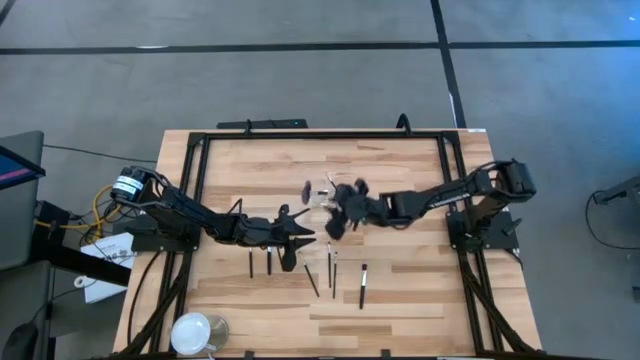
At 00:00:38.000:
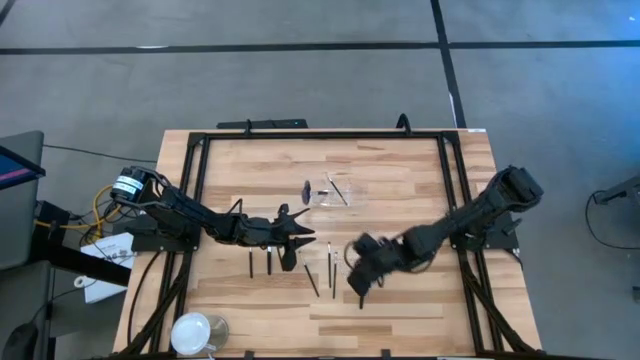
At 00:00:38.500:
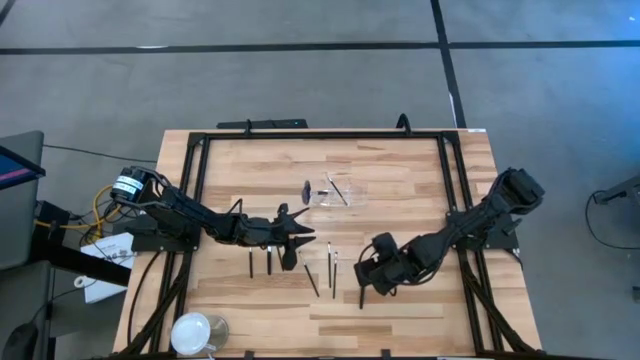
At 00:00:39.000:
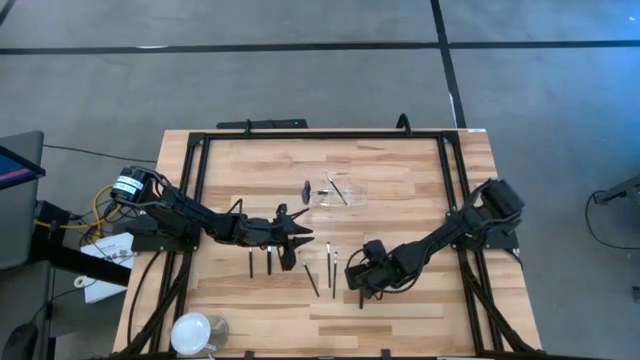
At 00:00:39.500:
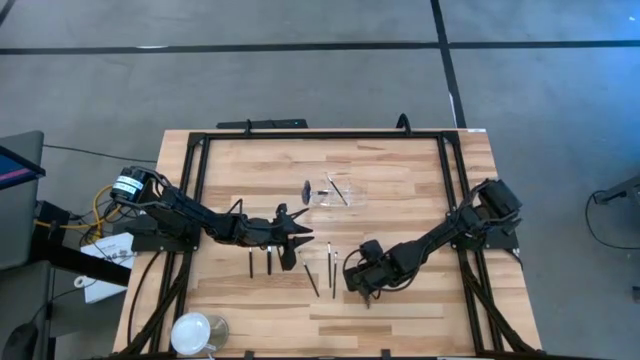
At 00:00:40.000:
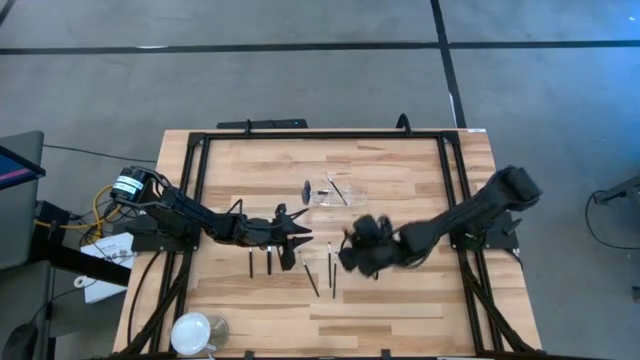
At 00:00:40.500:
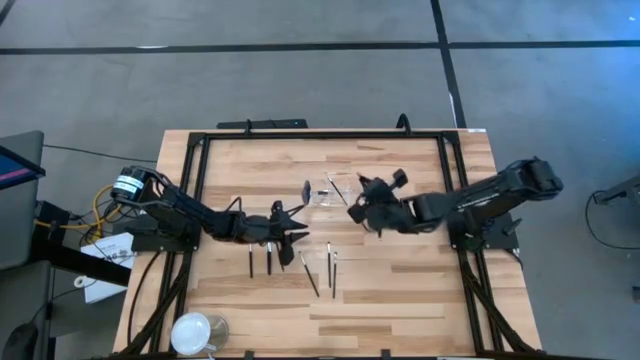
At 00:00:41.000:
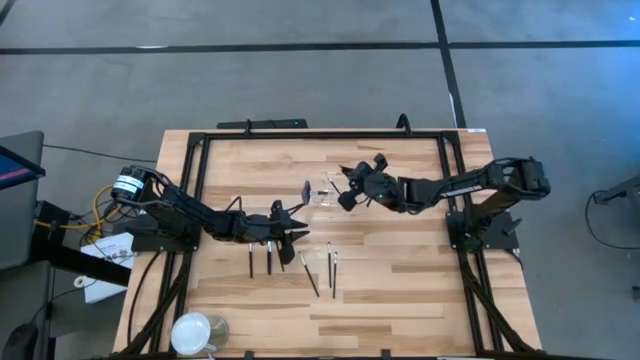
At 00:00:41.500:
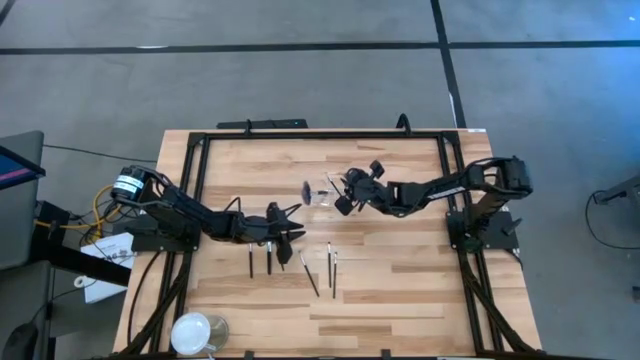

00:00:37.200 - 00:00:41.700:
Task: Put items in baskets/containers
Put the foundation brush into the right section of the transparent organizer

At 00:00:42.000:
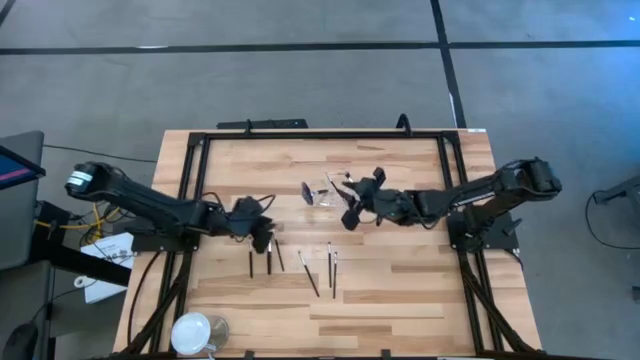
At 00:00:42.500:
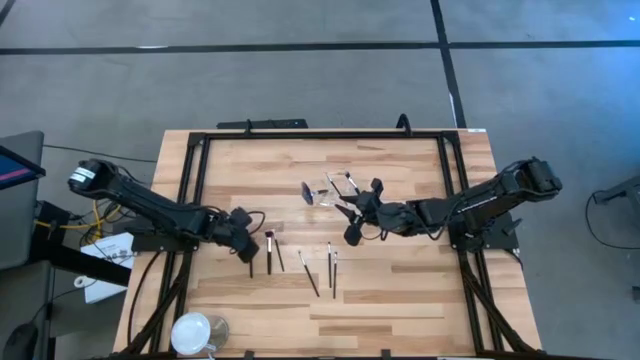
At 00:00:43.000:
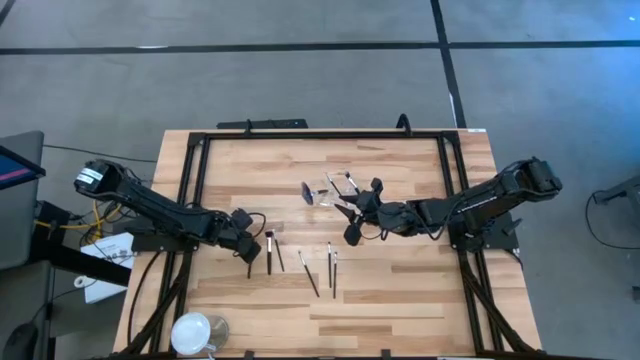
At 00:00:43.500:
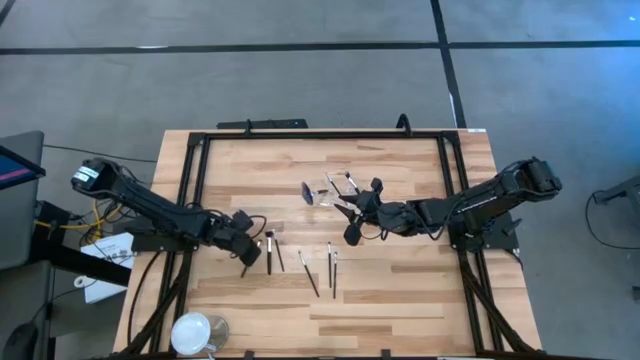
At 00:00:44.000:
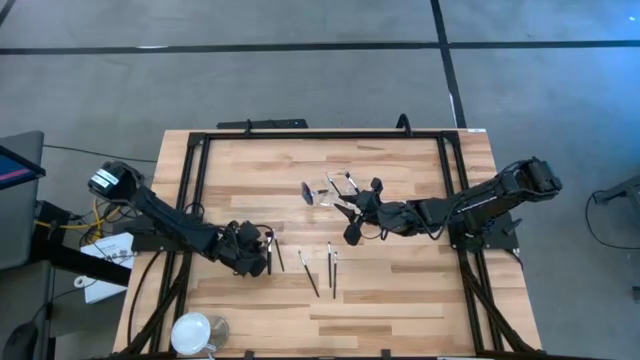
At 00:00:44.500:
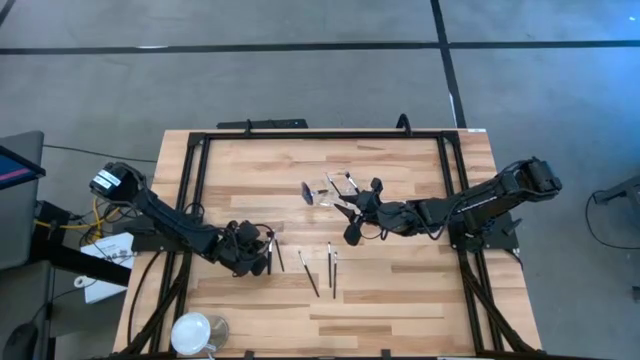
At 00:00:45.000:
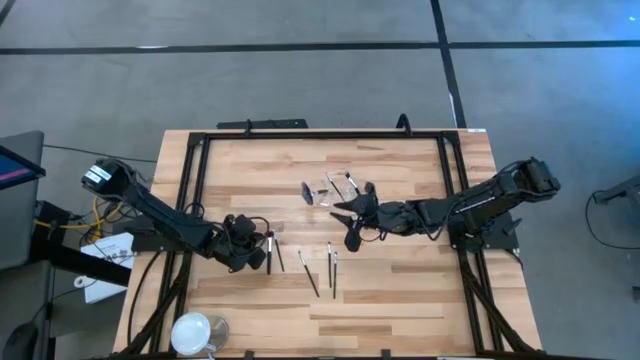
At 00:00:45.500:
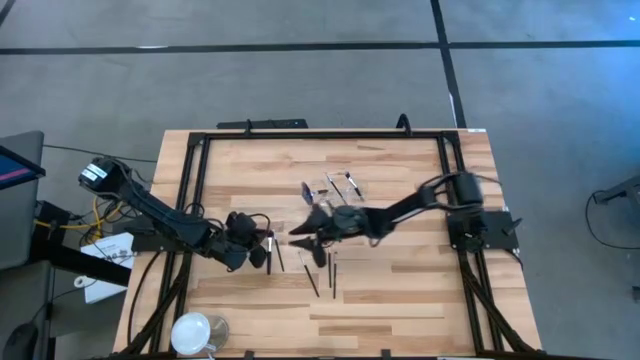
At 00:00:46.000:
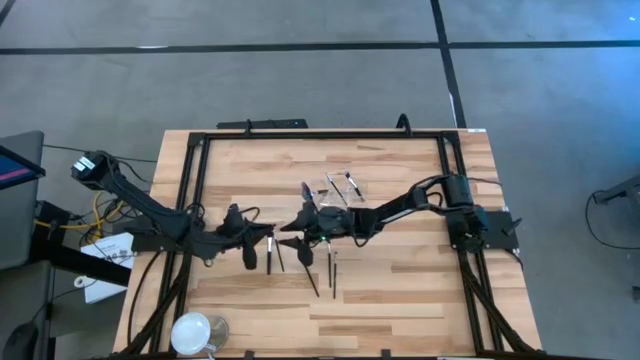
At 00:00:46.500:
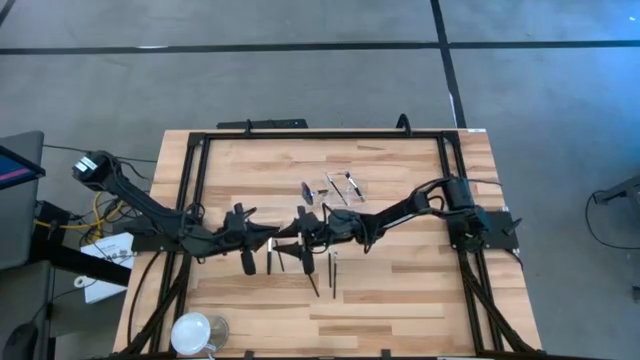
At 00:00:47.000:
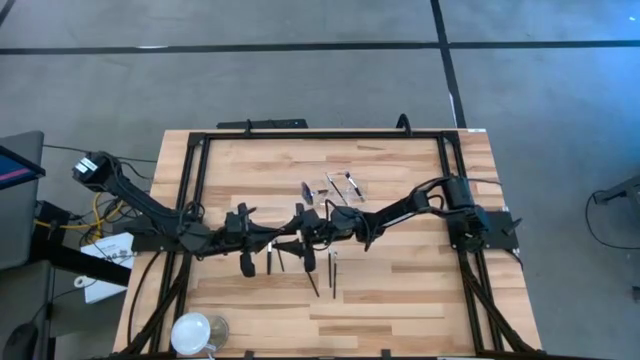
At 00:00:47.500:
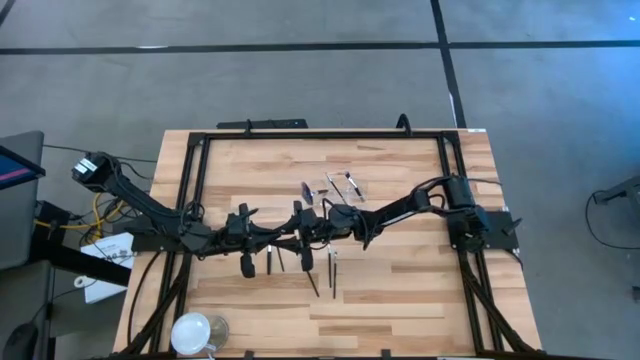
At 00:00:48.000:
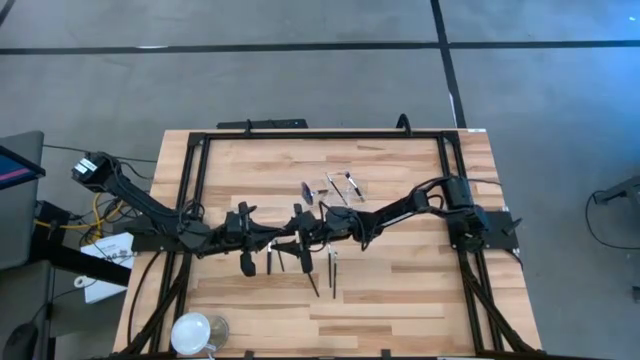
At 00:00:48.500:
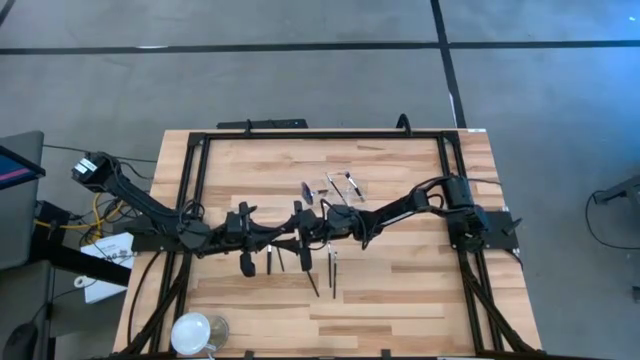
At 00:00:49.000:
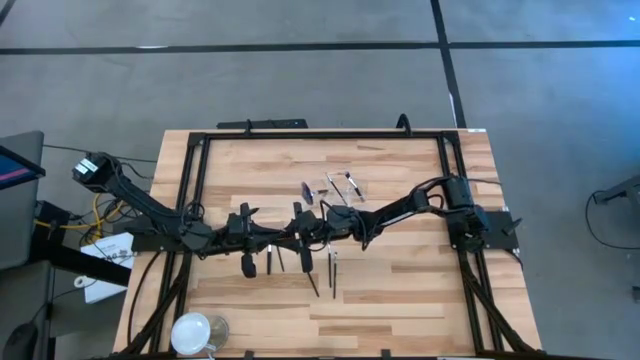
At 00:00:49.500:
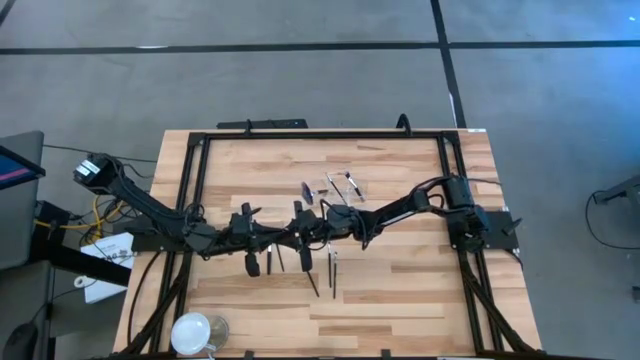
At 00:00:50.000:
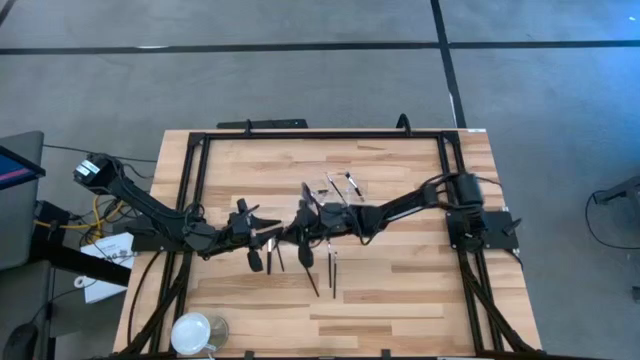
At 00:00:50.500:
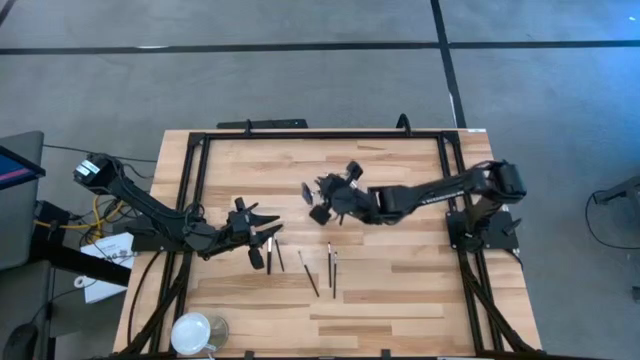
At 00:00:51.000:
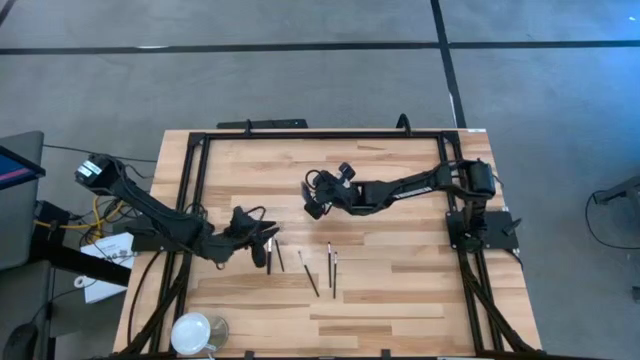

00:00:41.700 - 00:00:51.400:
Put the eyeshadow brush into the left section of the transparent organizer

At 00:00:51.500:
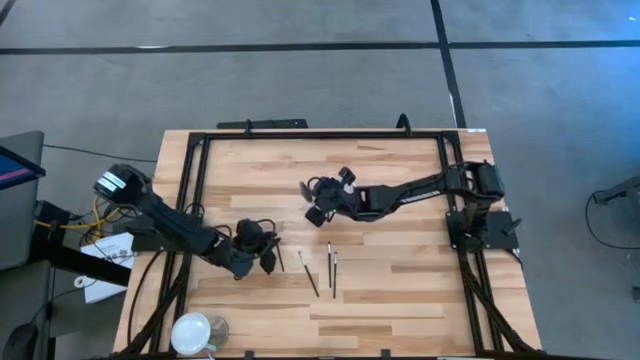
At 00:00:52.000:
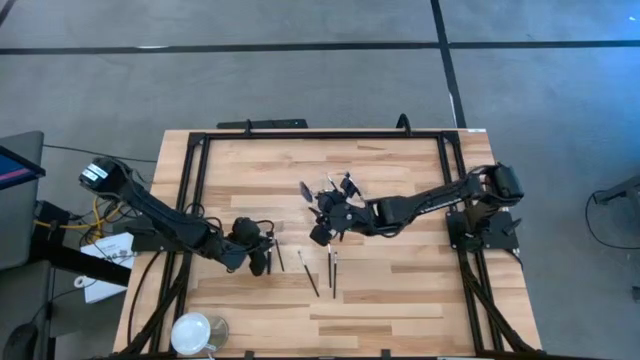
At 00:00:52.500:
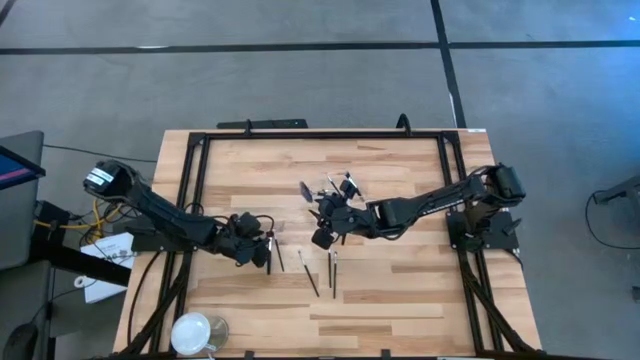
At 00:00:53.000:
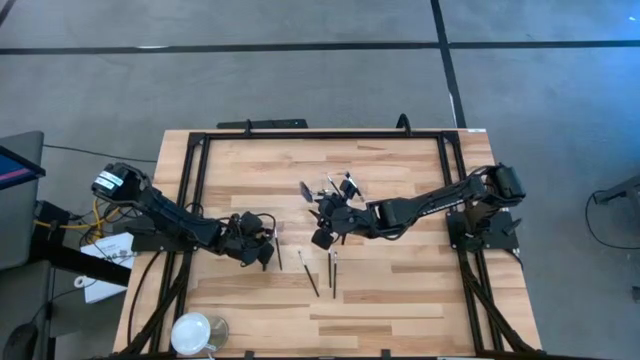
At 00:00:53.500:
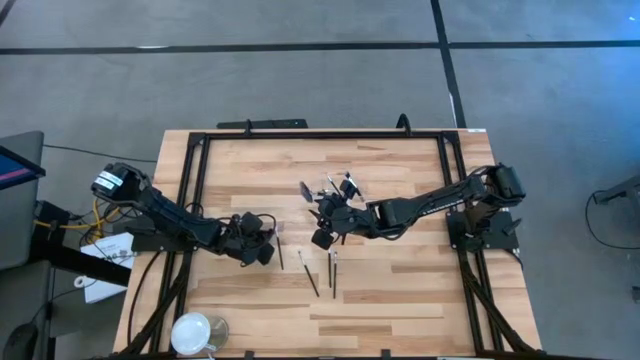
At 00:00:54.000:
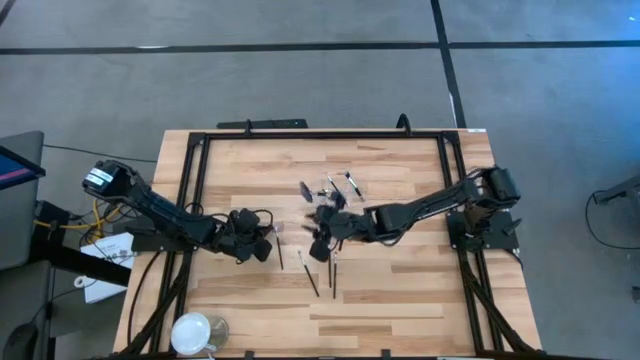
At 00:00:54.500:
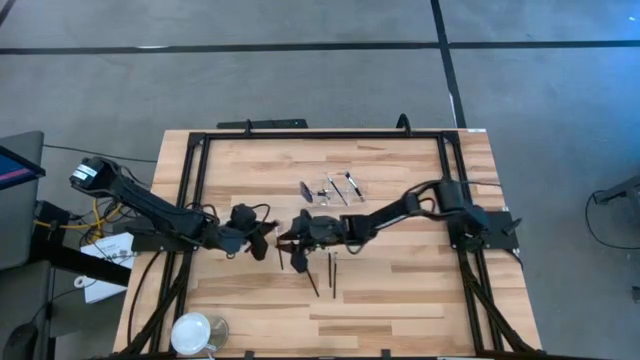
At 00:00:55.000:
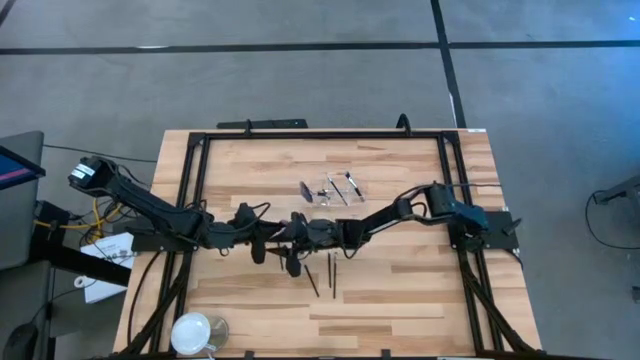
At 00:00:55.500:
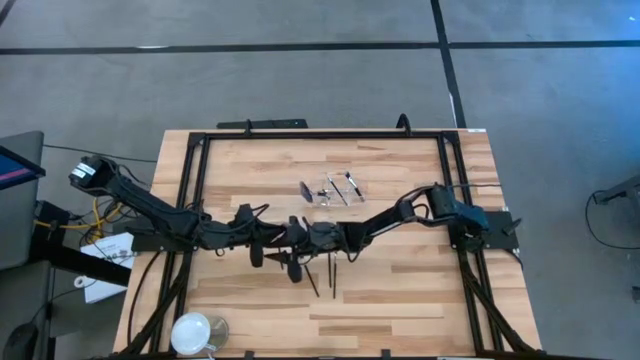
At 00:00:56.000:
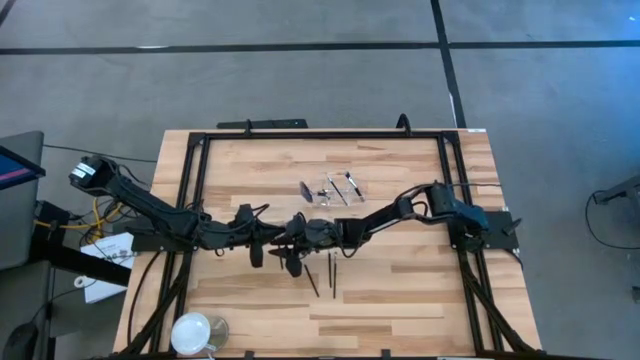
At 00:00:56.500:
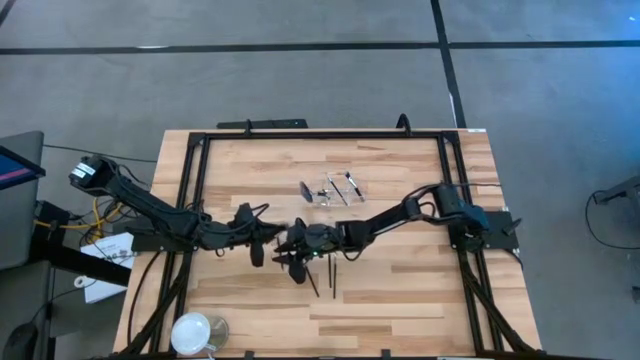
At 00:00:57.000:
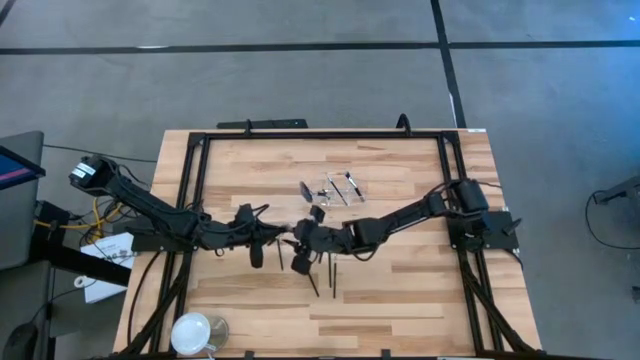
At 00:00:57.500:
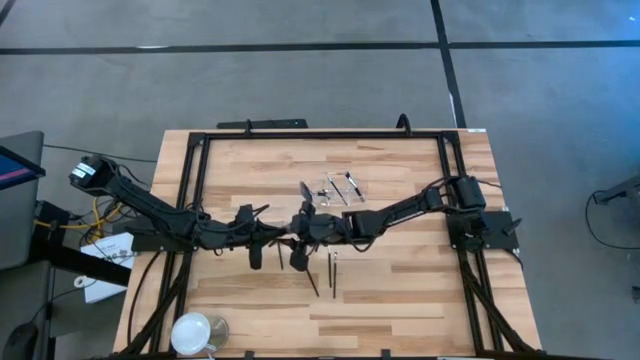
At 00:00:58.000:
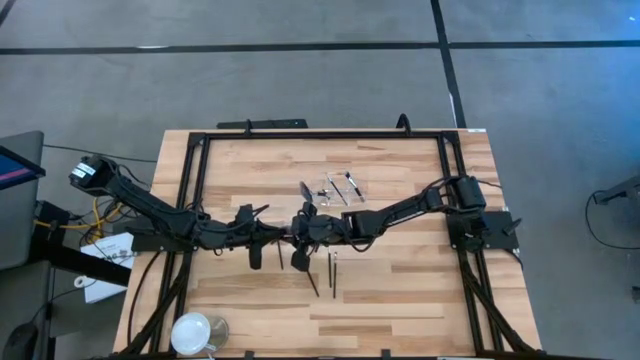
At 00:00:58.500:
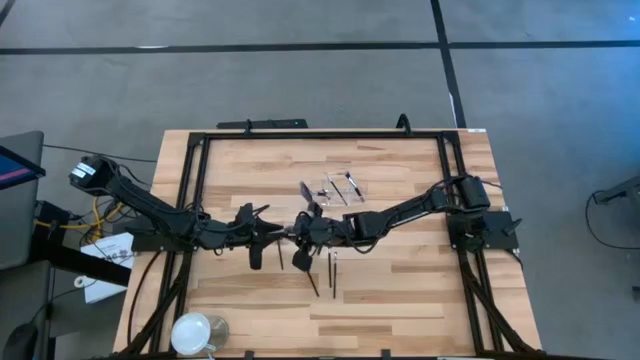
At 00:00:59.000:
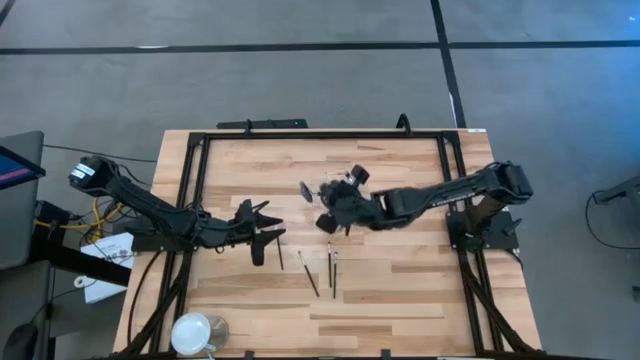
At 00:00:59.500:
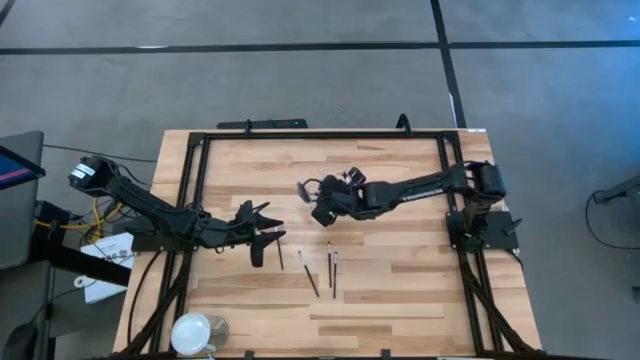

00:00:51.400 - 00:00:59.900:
Put the powder brush into the middle section of the transparent organizer
